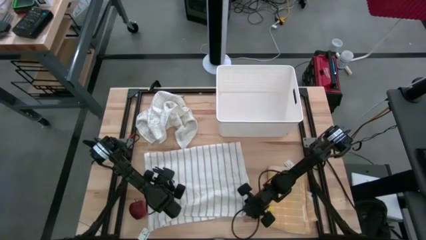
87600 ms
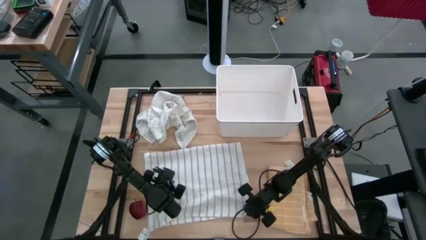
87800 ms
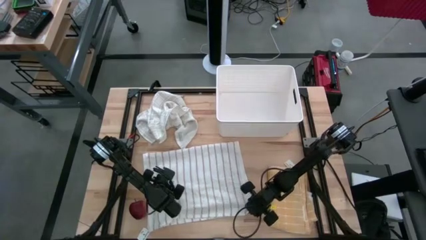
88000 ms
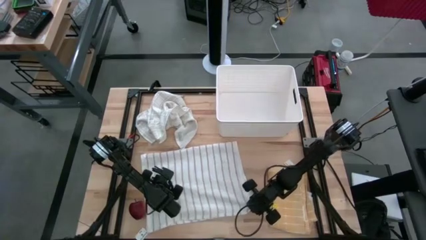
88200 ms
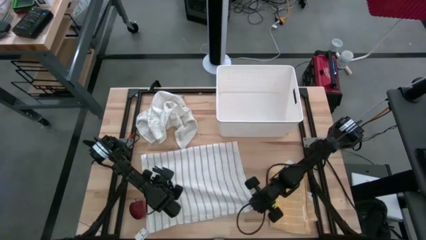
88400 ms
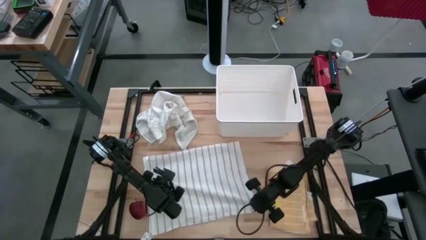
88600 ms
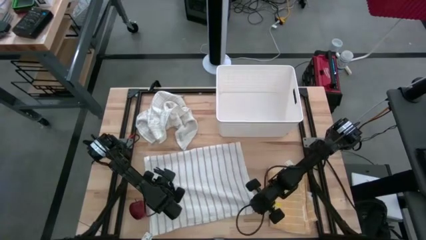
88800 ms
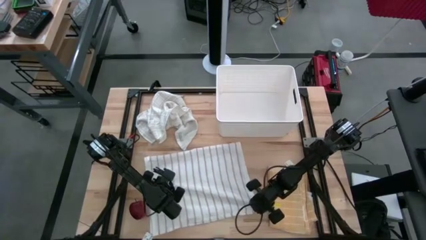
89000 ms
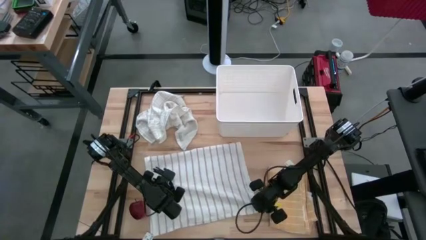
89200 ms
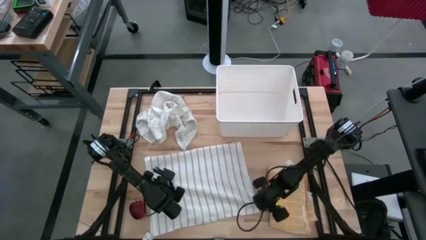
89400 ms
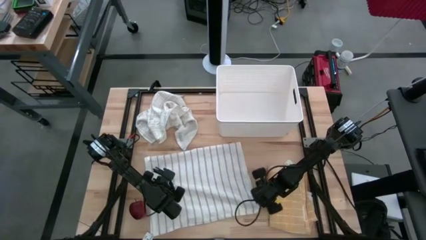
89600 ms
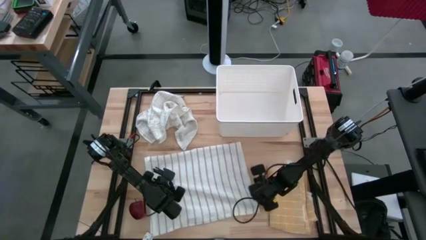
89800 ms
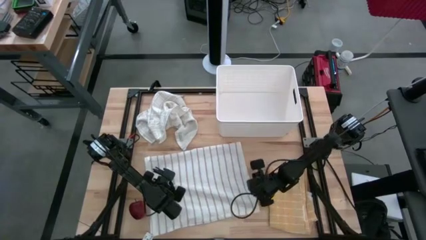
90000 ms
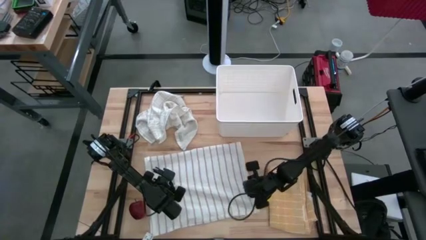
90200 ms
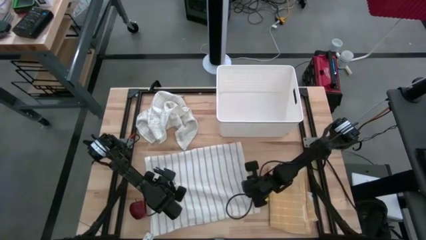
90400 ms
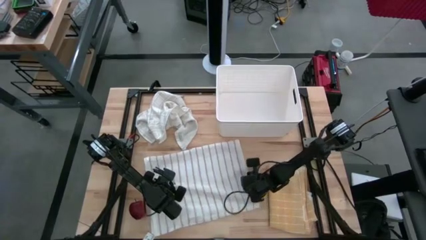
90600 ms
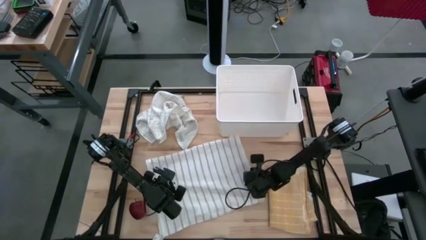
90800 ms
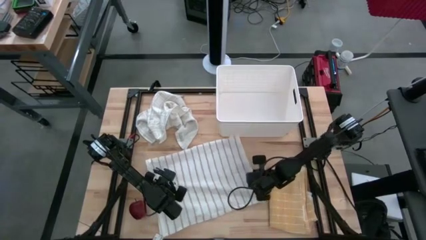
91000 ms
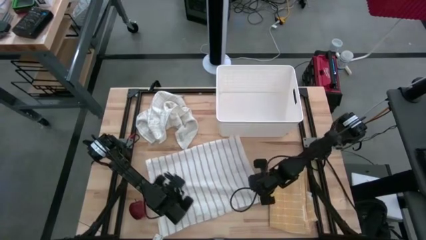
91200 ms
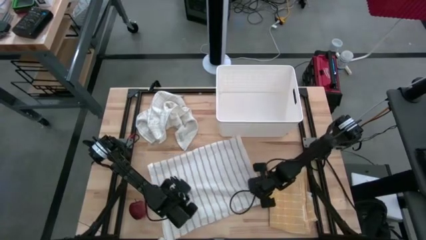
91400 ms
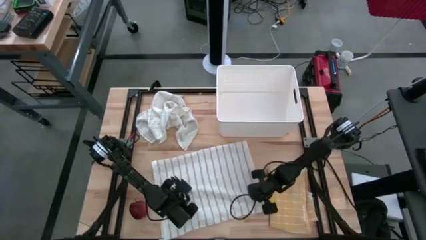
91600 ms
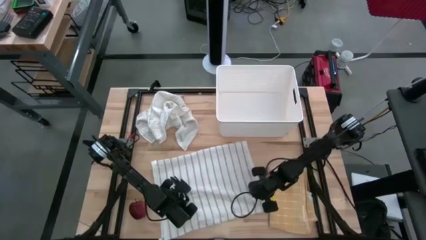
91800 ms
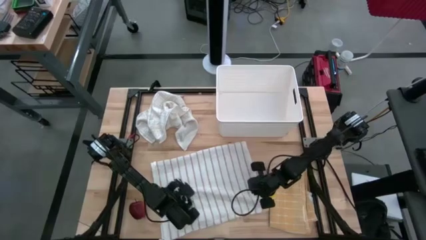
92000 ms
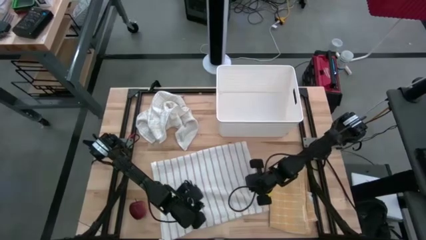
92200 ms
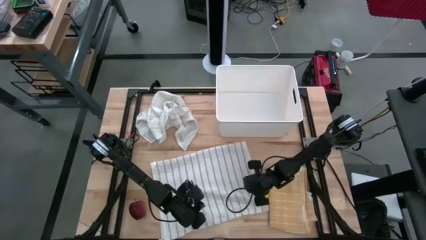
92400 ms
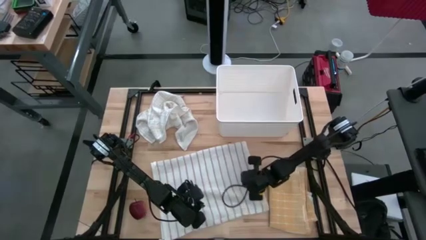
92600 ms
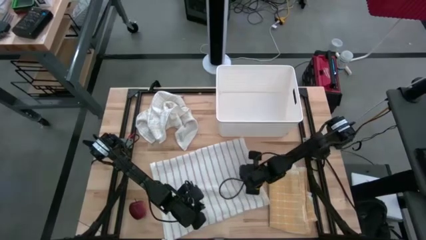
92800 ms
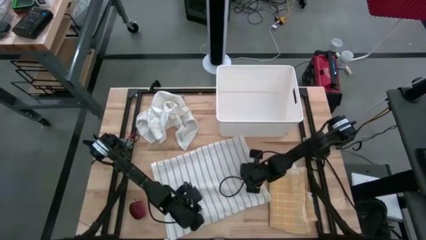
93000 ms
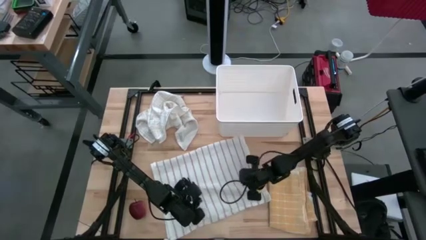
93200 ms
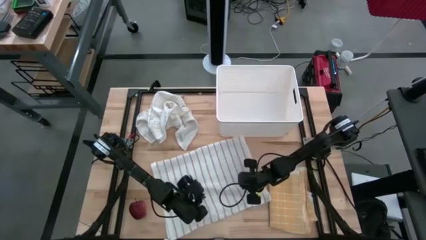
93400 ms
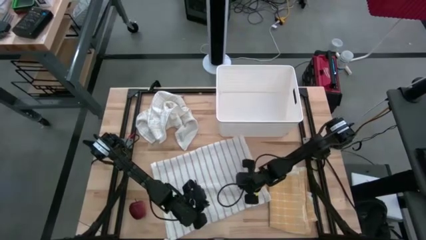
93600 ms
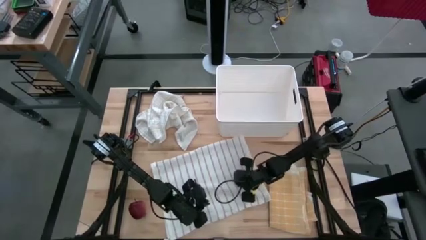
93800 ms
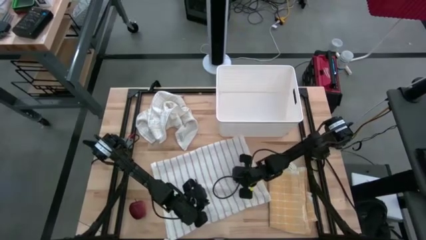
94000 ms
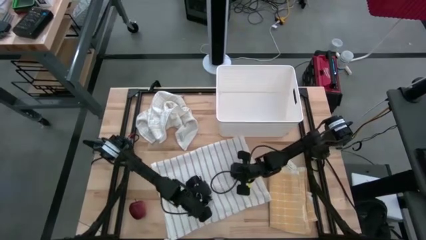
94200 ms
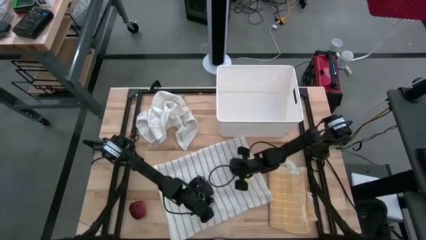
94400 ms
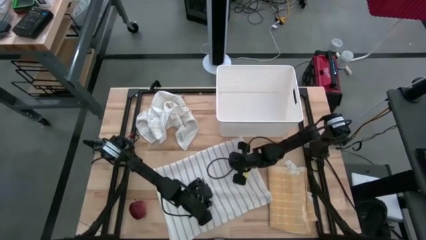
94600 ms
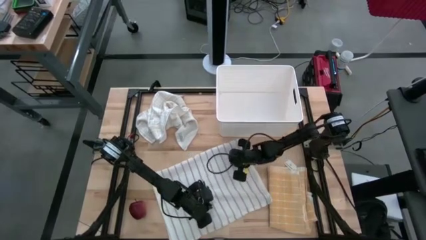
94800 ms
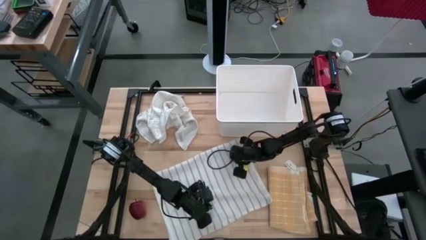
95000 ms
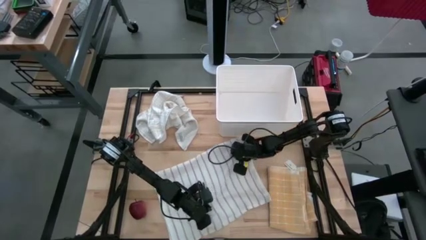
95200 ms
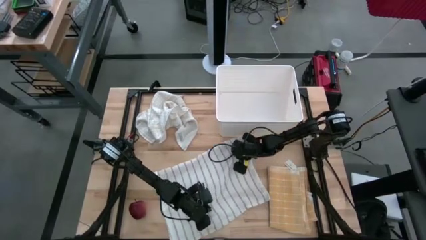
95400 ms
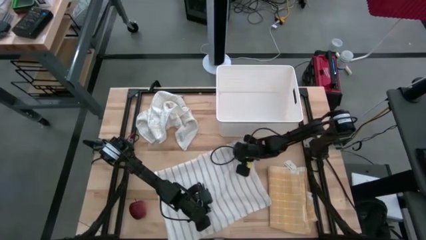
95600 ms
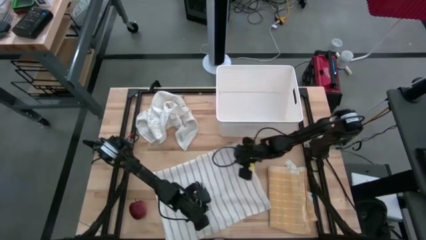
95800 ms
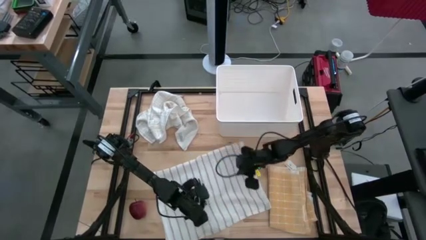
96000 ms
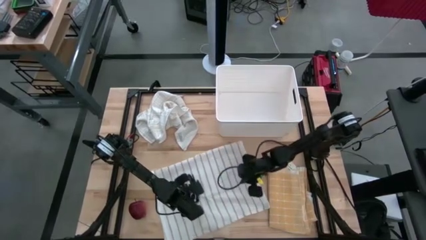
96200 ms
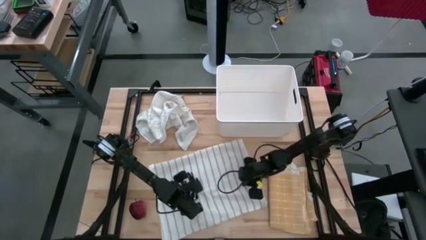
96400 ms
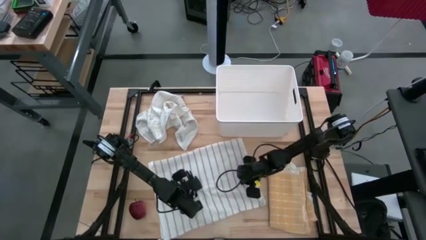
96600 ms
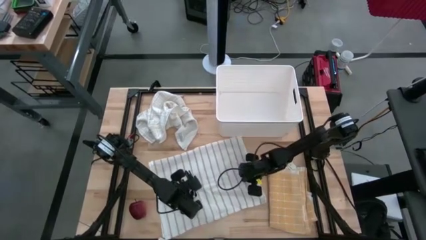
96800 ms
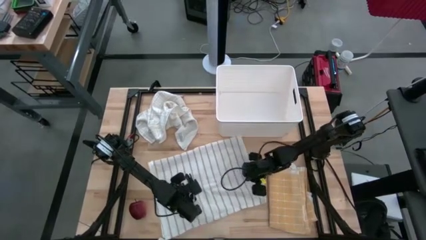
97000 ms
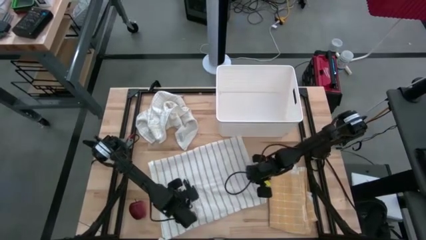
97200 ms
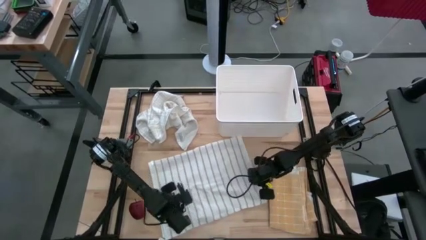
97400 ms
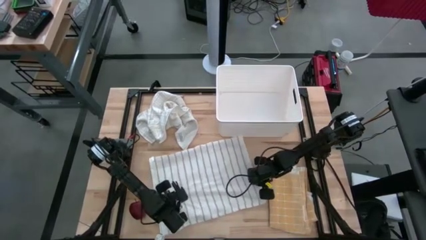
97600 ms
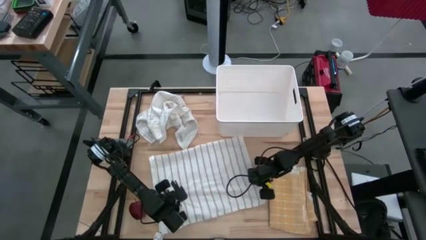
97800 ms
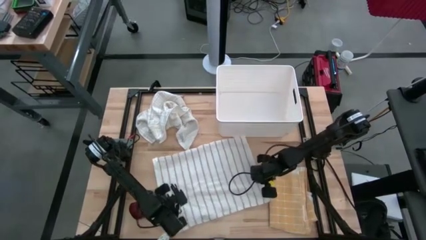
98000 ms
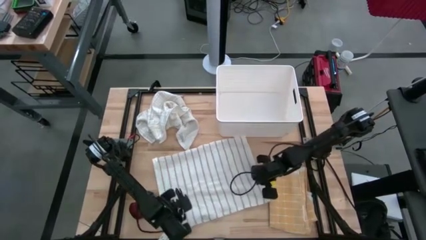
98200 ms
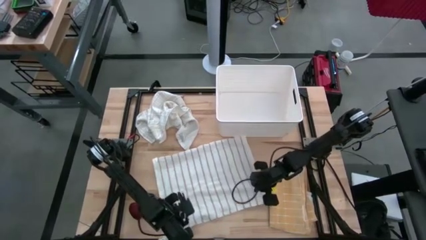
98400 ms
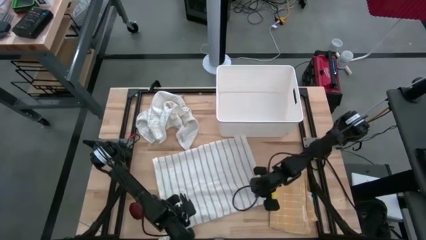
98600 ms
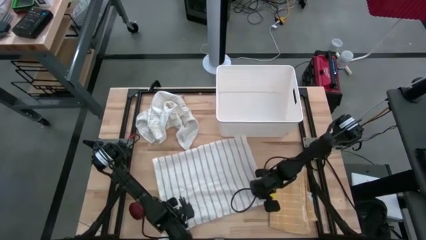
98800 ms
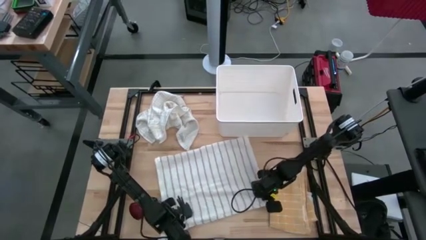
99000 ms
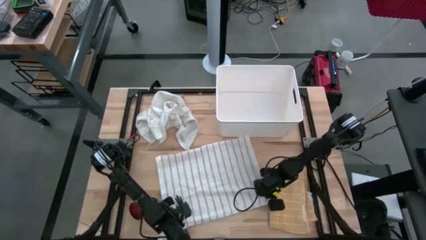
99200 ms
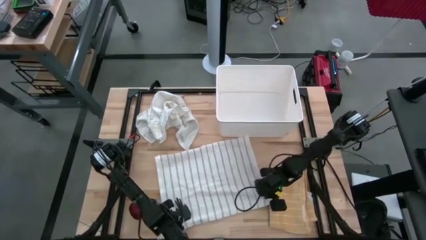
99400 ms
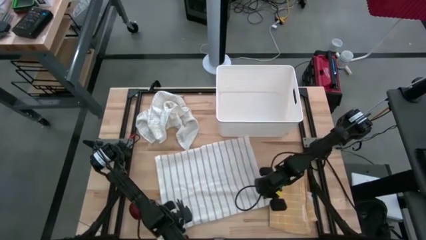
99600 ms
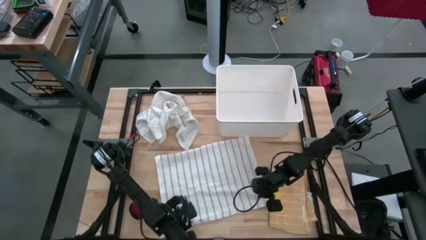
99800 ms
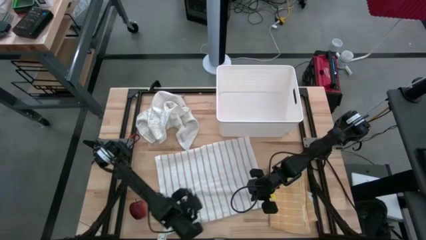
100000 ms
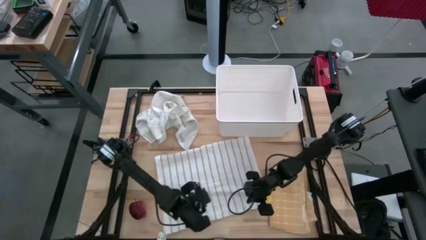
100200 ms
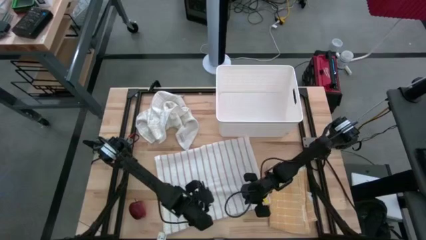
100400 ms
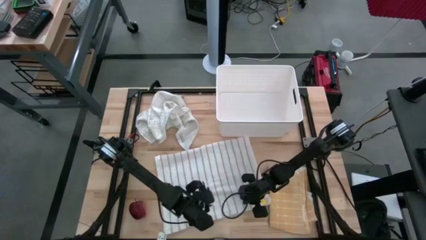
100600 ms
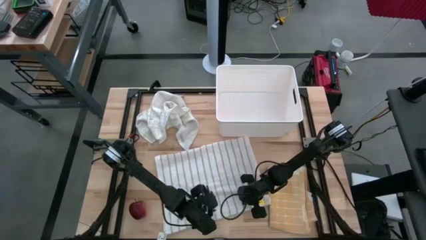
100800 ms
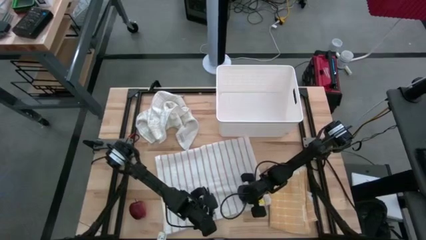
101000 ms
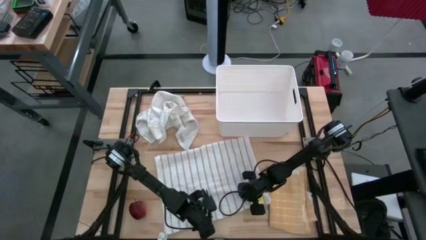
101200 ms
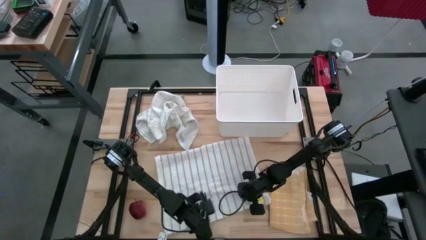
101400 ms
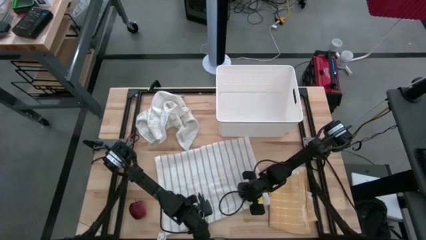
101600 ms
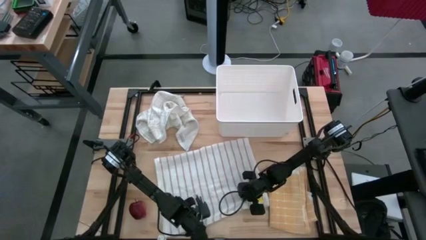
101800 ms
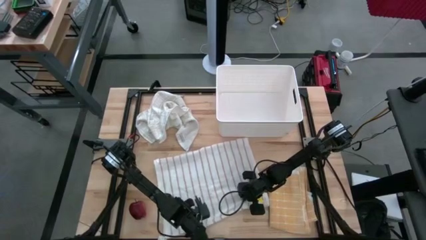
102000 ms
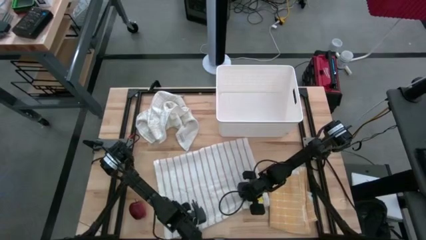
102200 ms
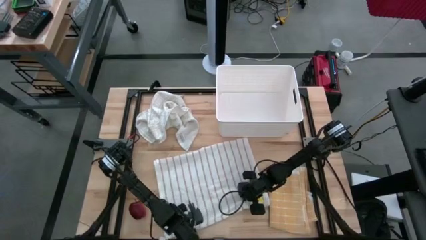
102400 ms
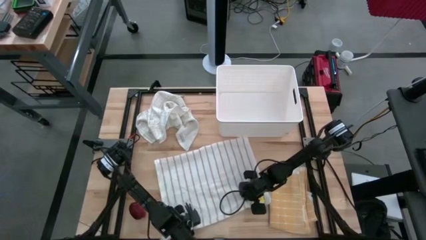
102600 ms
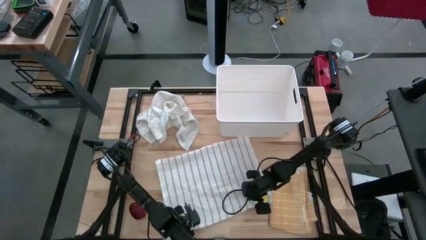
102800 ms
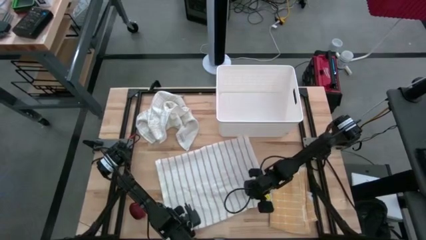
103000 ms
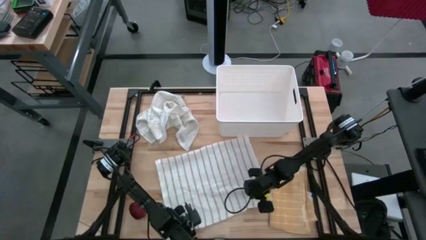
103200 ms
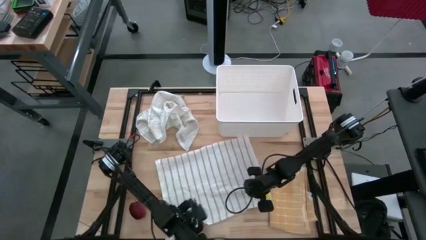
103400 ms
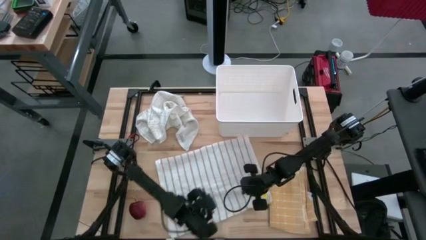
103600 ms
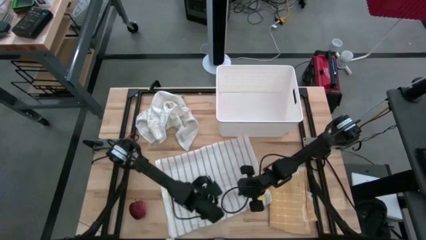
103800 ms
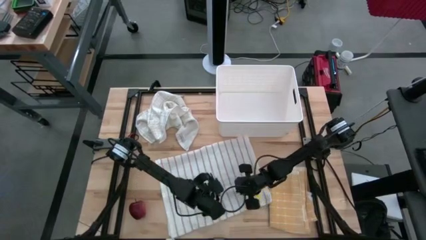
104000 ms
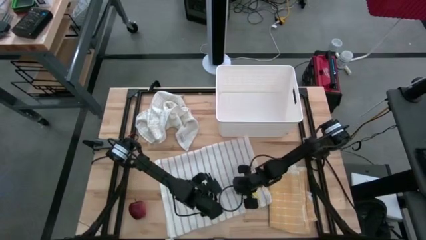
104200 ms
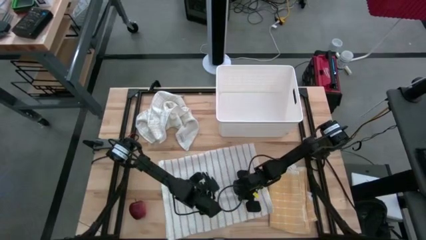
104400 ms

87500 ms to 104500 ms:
Task: Fold towel
Fold the white striped towel
